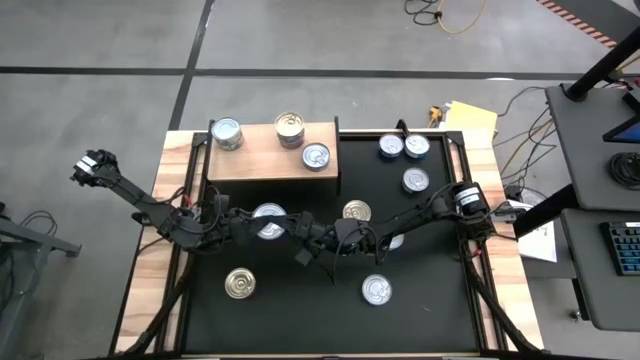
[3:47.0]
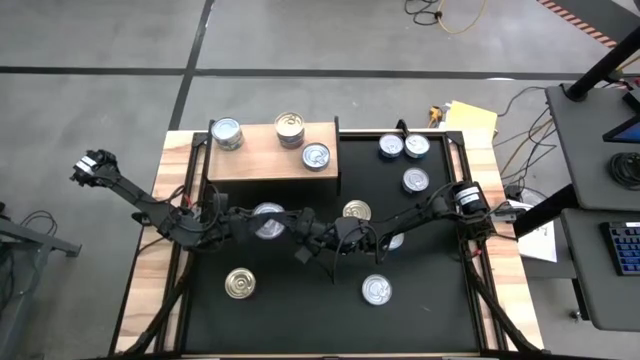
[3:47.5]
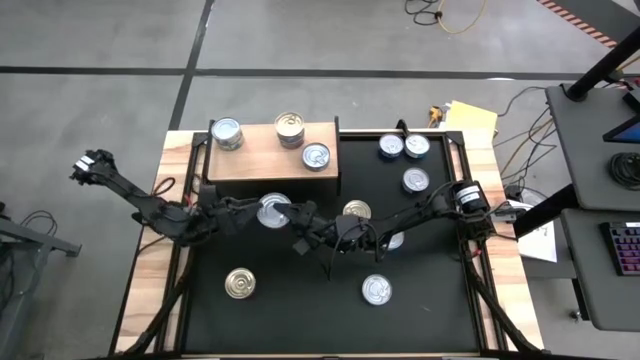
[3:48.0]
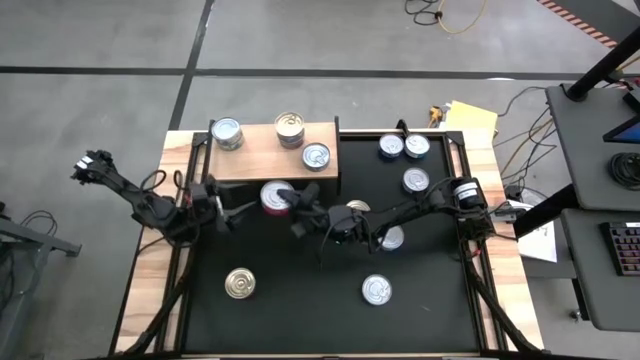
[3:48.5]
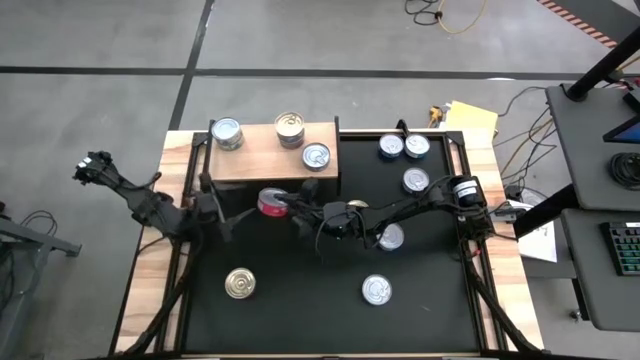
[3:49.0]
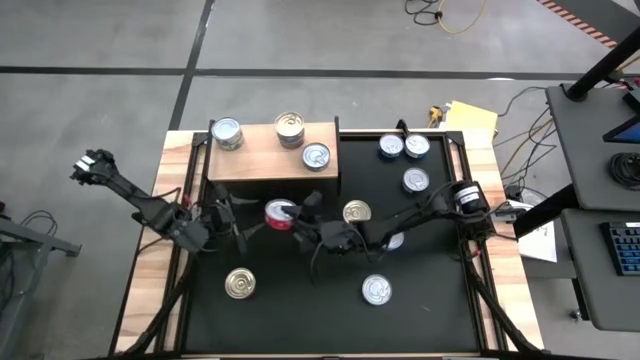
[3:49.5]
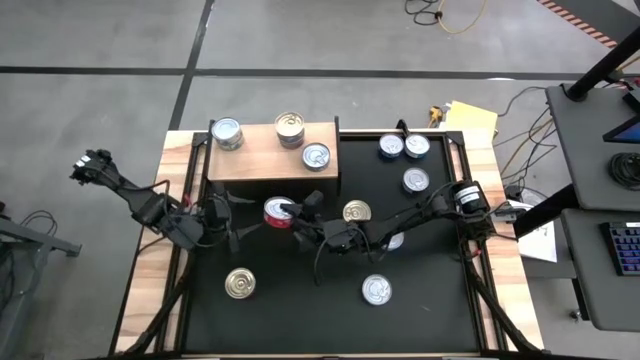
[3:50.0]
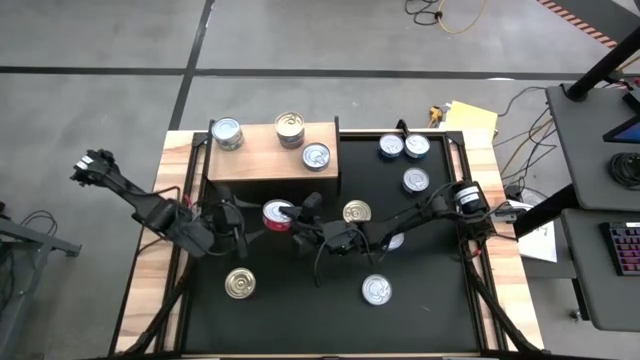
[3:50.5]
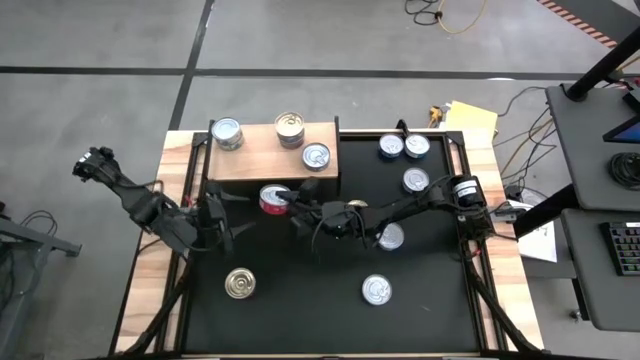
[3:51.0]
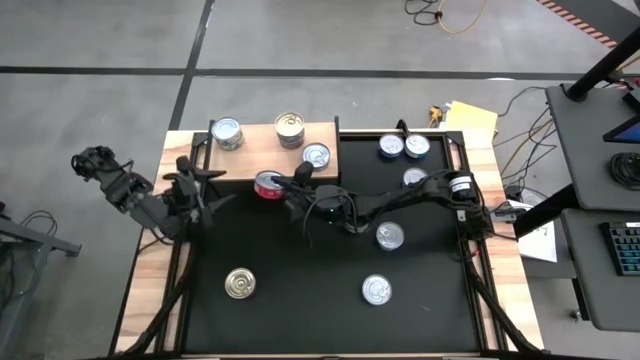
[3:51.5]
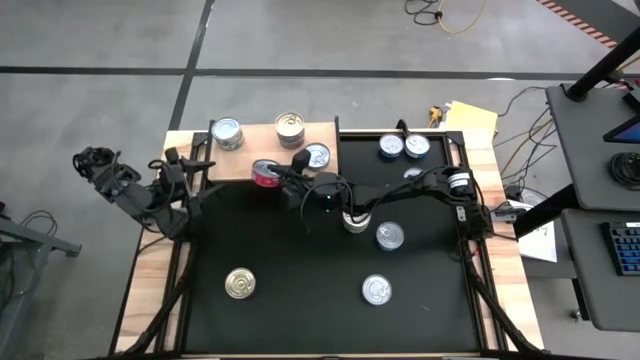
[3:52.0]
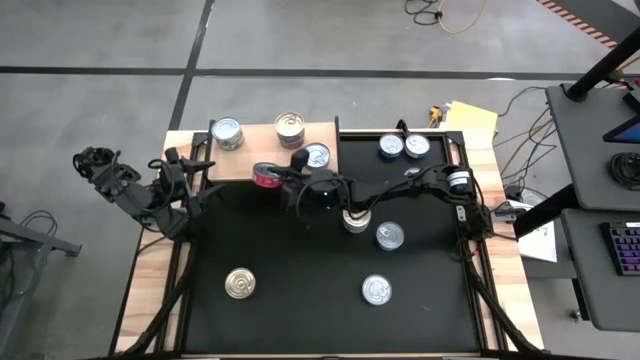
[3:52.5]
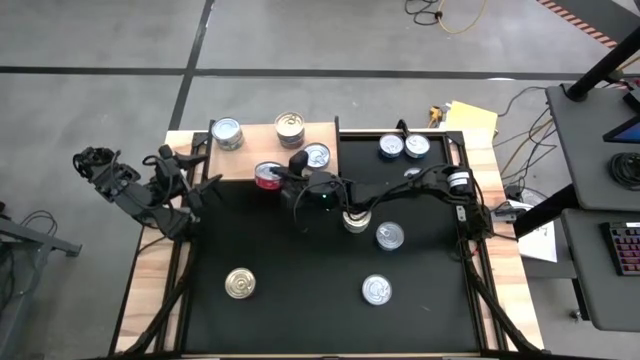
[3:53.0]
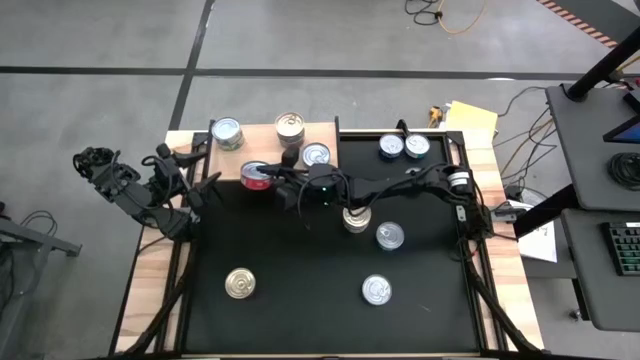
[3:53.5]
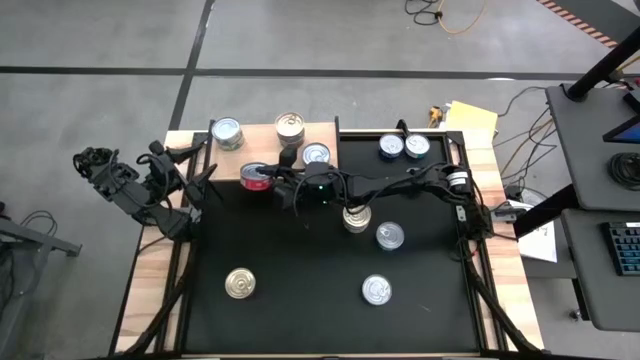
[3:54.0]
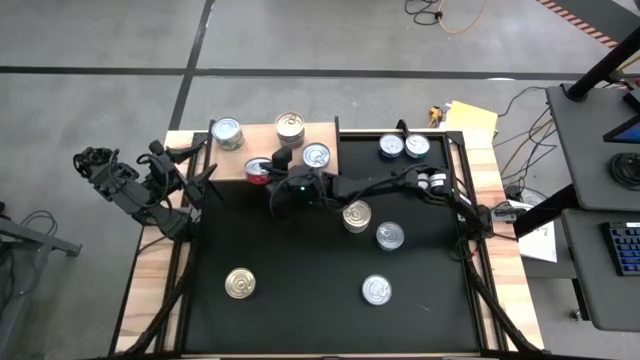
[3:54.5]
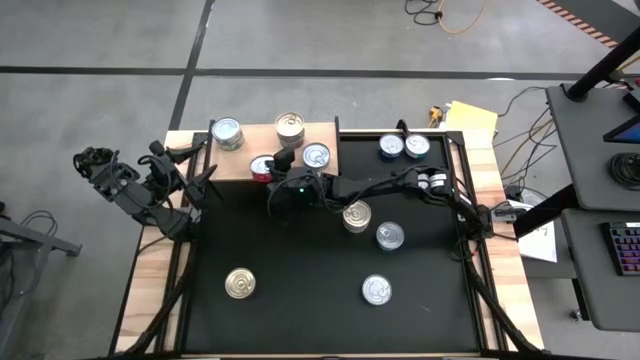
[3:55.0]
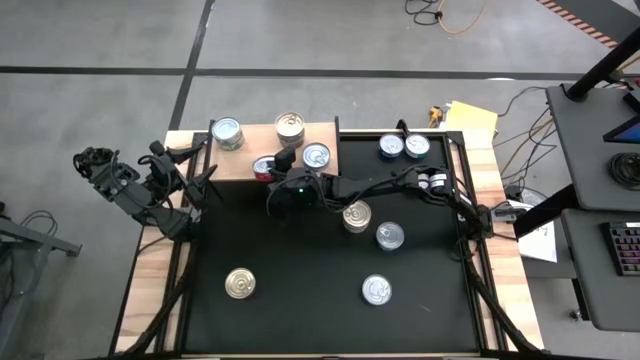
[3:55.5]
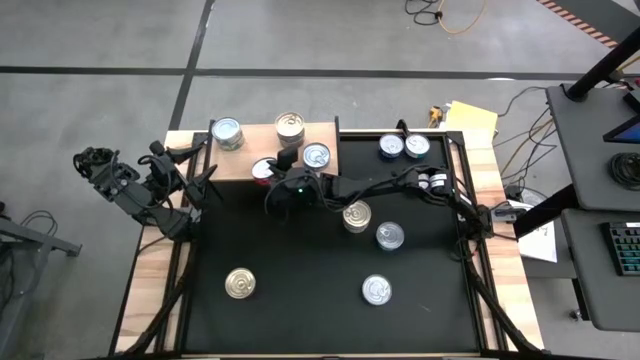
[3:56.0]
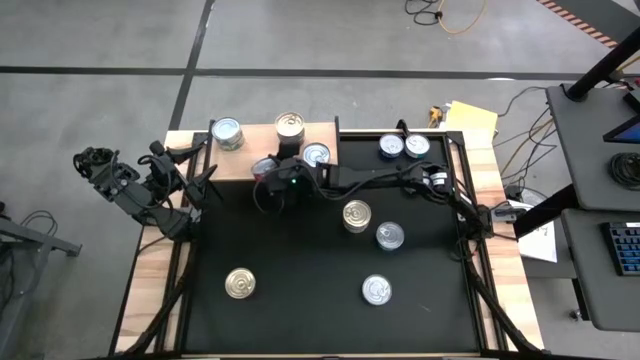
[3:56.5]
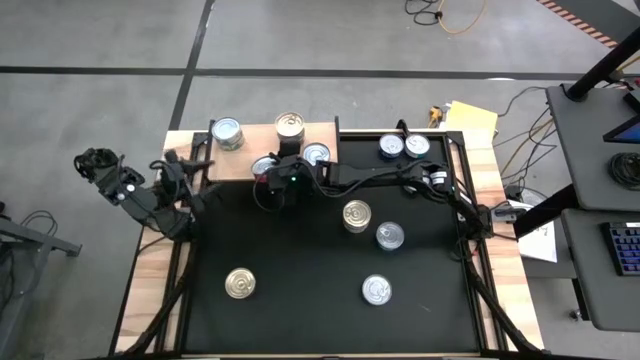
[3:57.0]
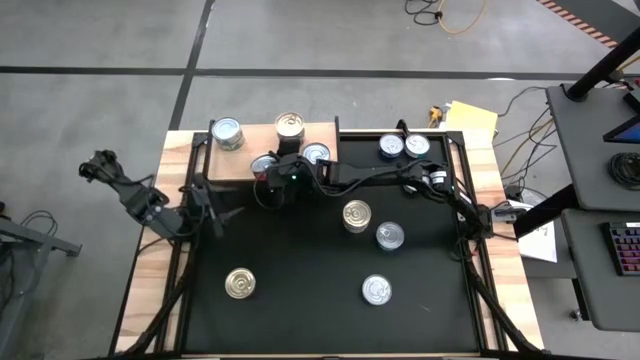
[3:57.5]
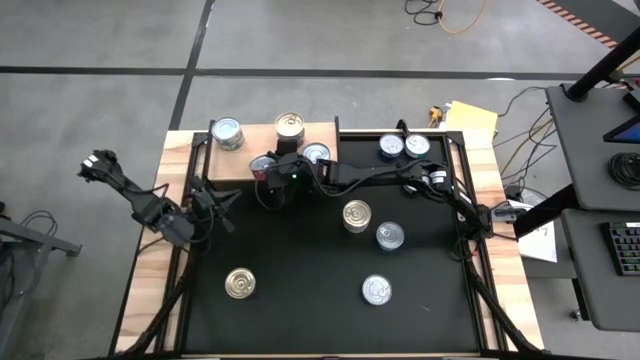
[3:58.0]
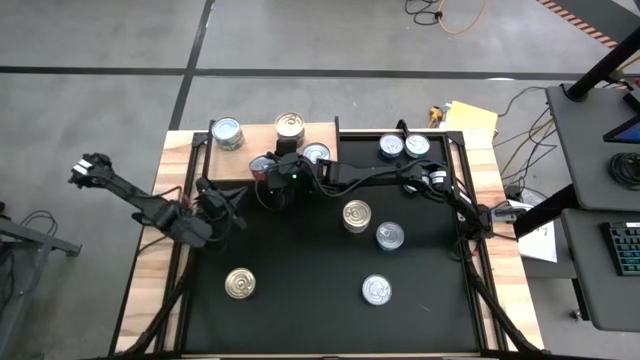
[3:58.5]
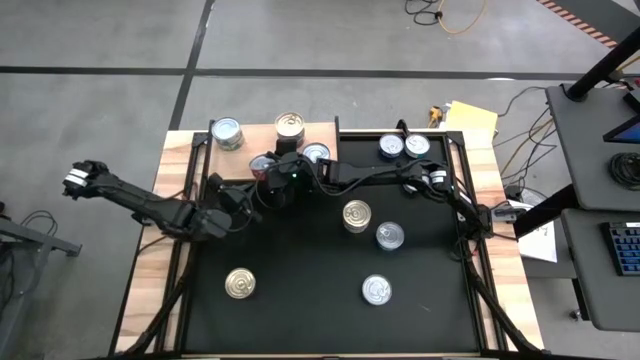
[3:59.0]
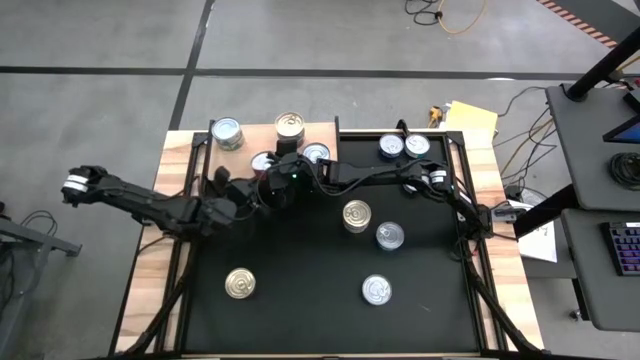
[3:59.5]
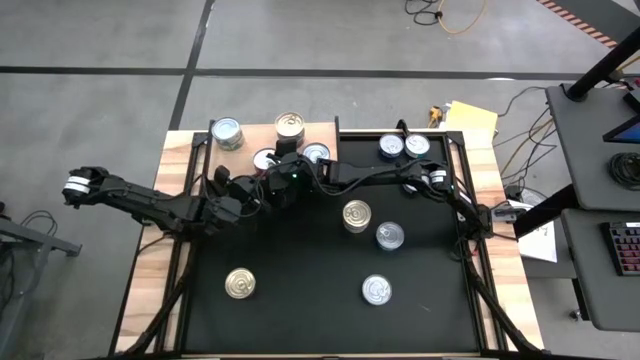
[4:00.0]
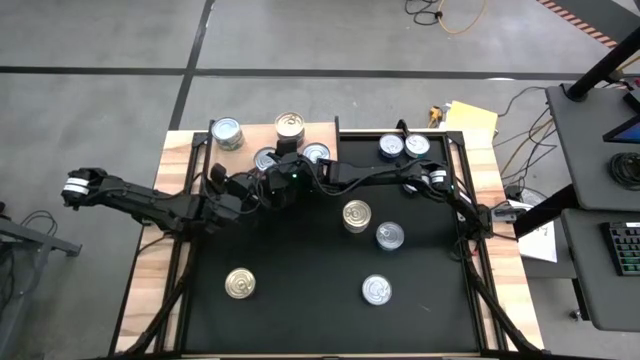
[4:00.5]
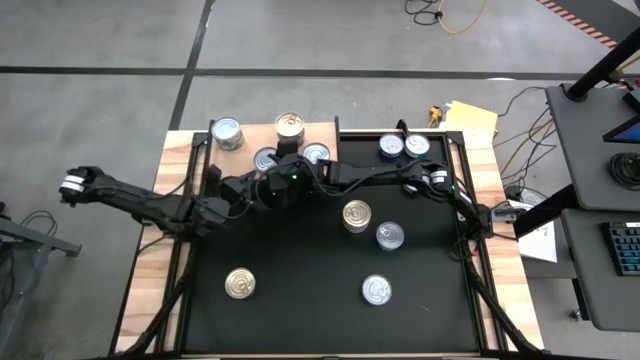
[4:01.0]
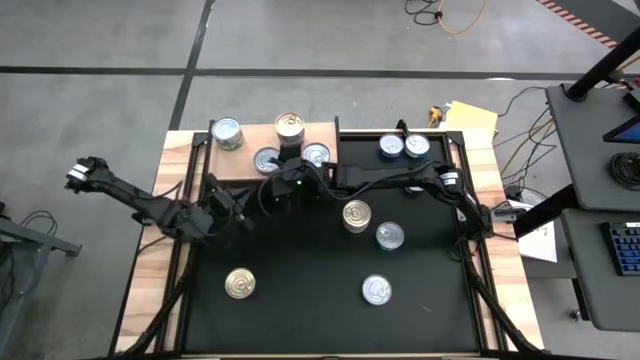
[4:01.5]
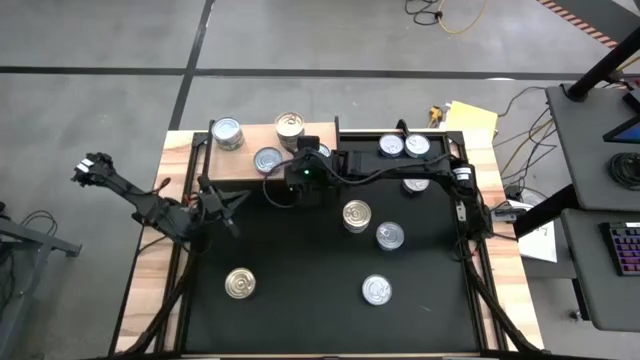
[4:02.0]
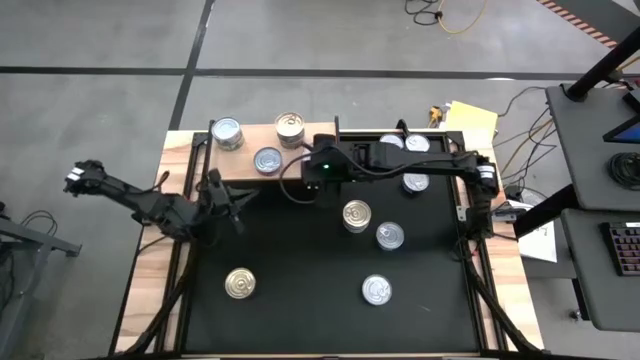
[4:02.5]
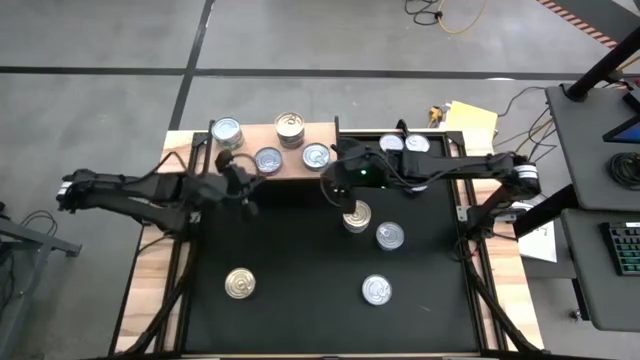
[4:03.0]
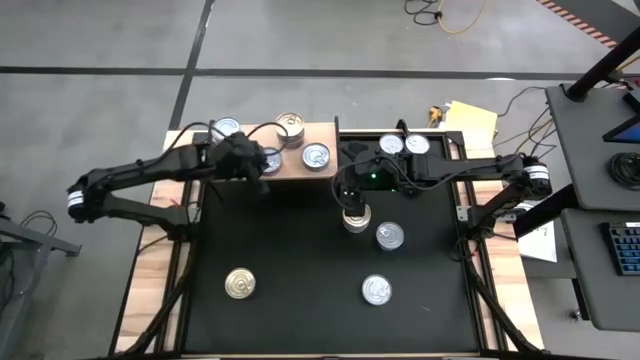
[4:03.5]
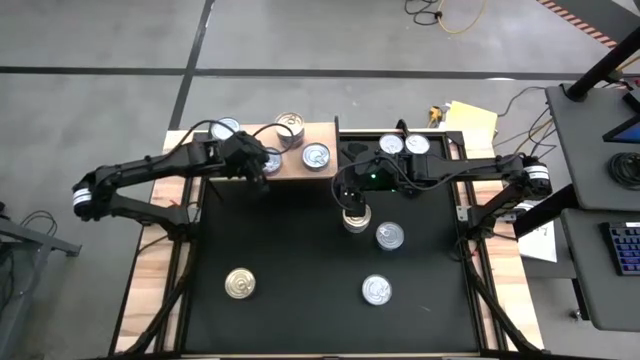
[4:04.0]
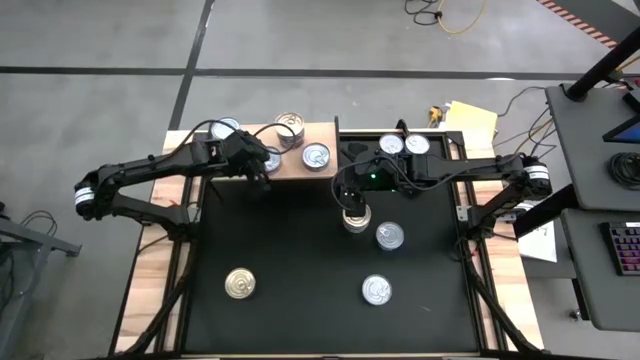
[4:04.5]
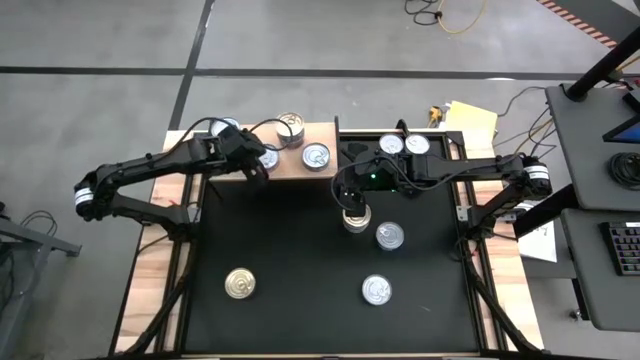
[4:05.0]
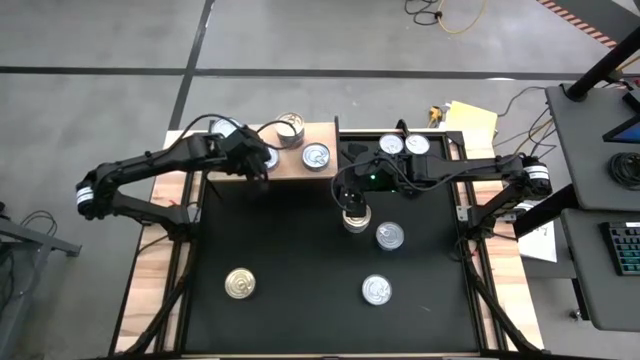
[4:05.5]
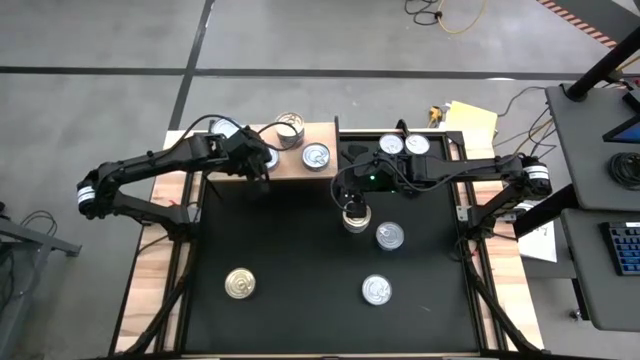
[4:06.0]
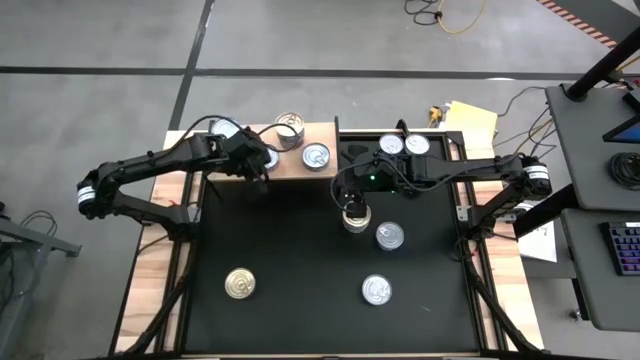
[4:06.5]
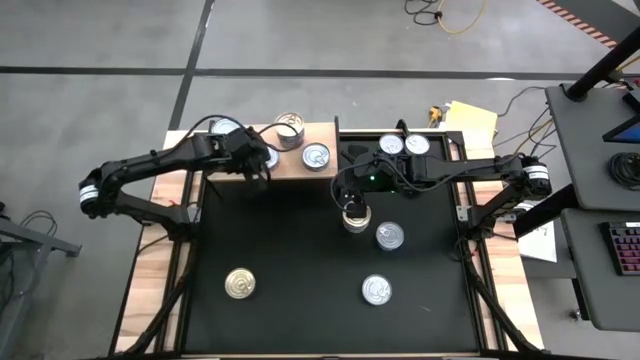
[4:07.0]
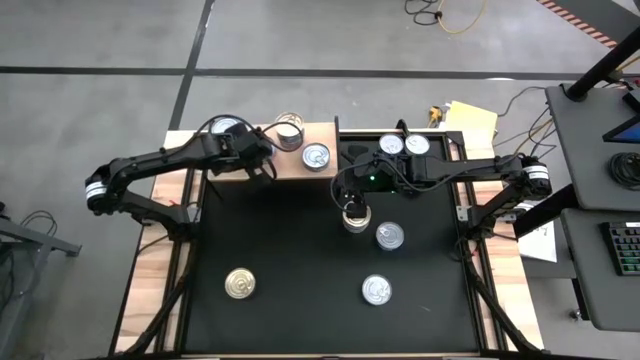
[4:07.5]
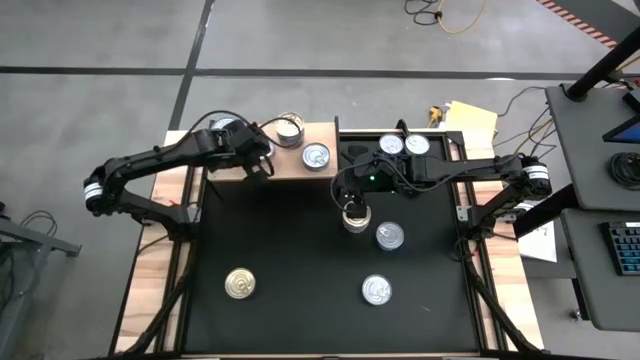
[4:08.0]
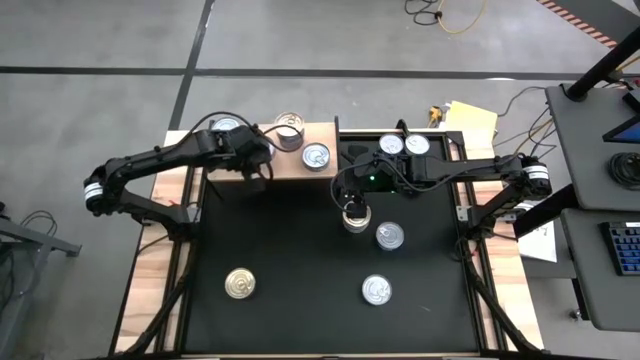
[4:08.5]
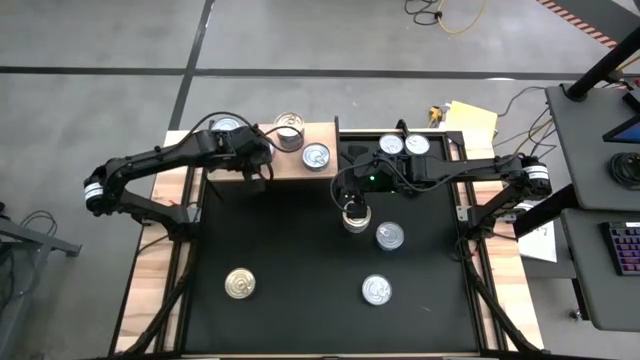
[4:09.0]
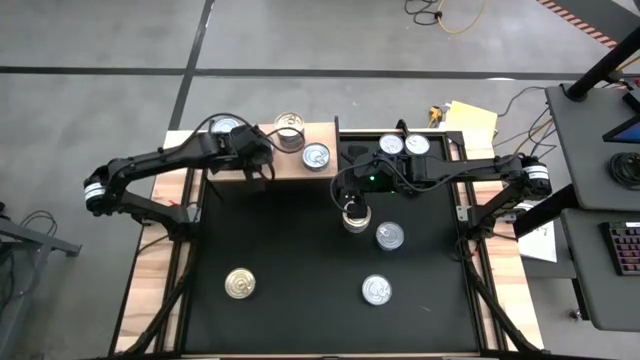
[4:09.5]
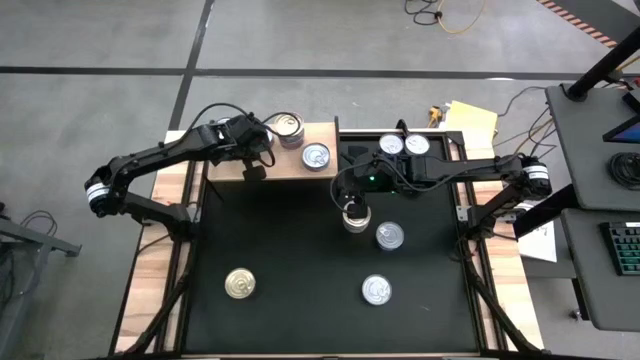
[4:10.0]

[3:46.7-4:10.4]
Task: Stack canned seafood by type on shelf
Put the red tuna can on the shelf
